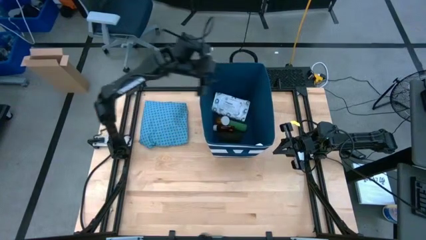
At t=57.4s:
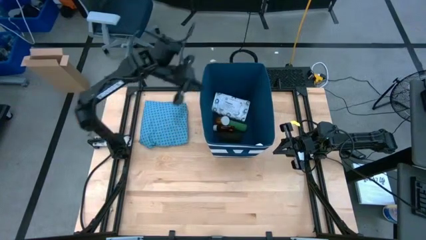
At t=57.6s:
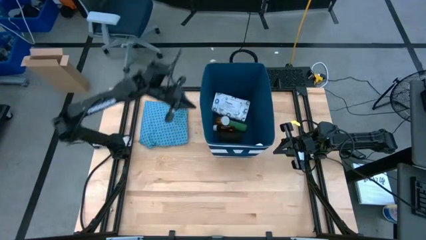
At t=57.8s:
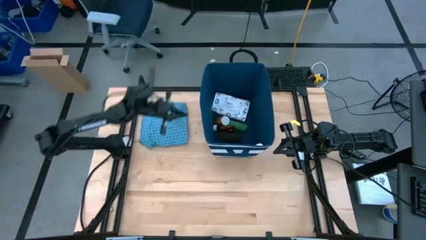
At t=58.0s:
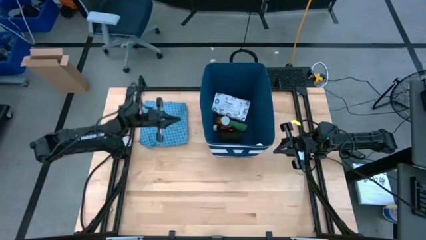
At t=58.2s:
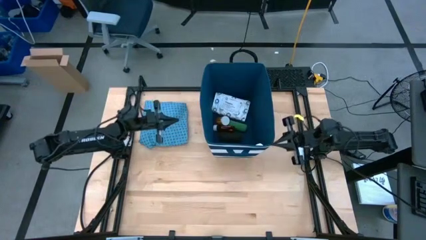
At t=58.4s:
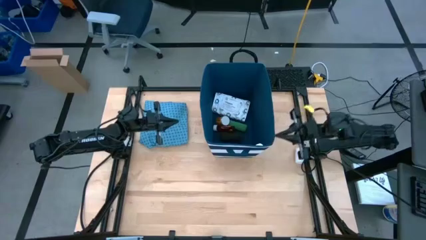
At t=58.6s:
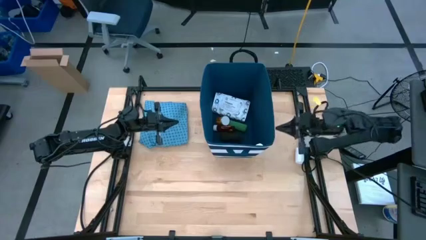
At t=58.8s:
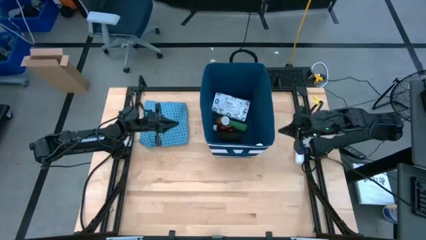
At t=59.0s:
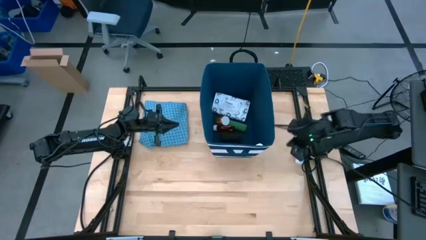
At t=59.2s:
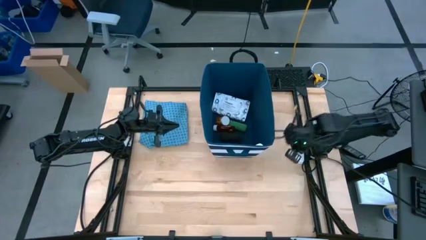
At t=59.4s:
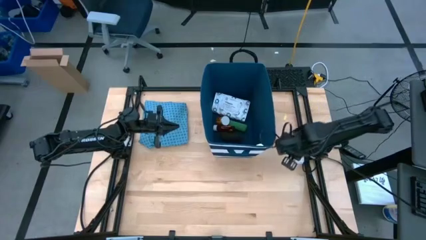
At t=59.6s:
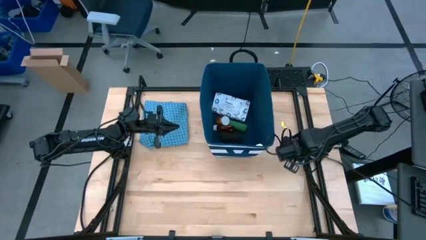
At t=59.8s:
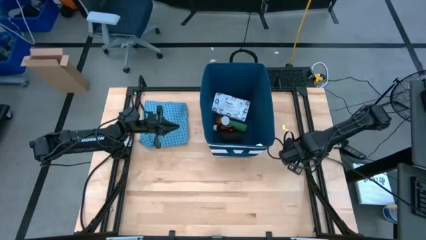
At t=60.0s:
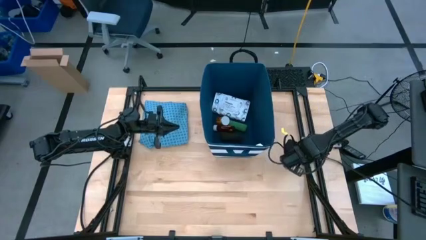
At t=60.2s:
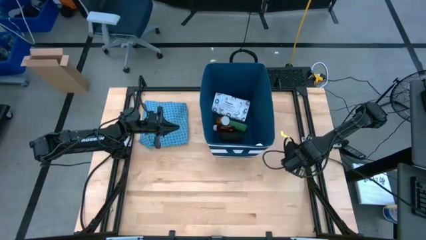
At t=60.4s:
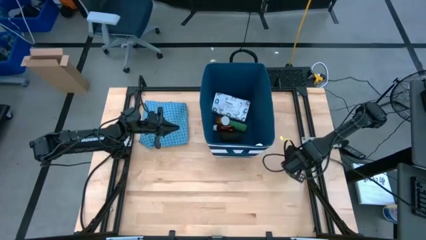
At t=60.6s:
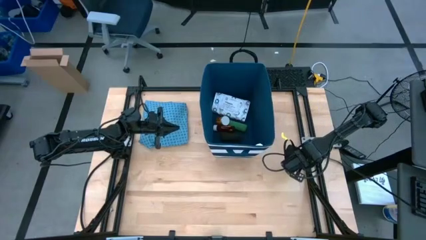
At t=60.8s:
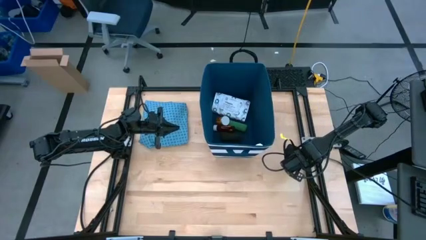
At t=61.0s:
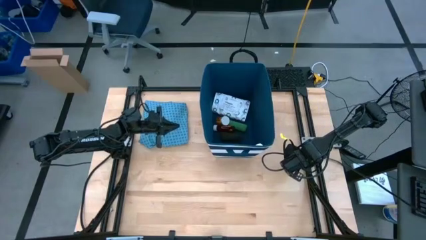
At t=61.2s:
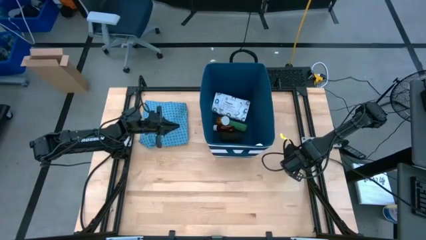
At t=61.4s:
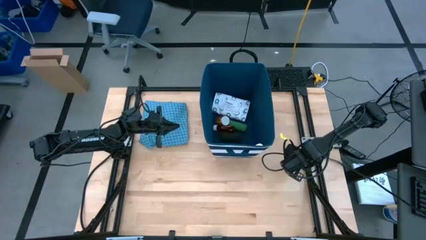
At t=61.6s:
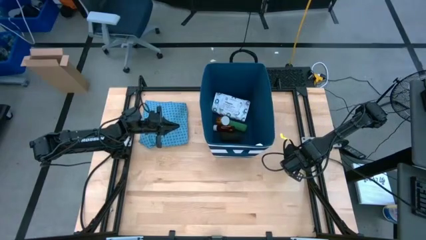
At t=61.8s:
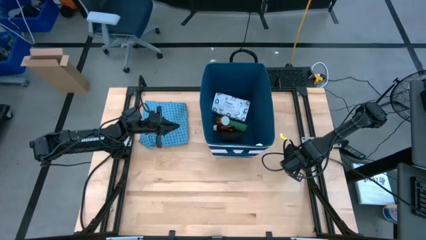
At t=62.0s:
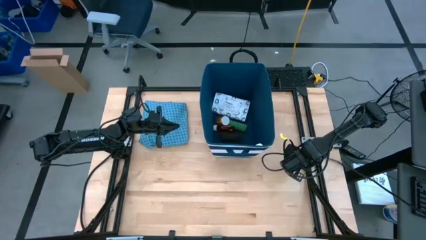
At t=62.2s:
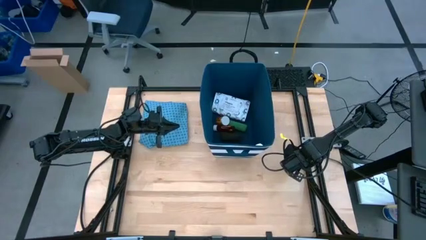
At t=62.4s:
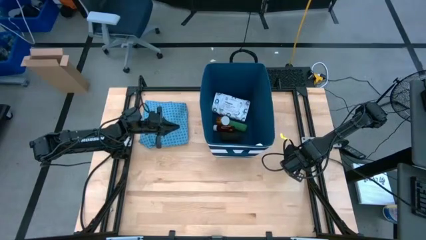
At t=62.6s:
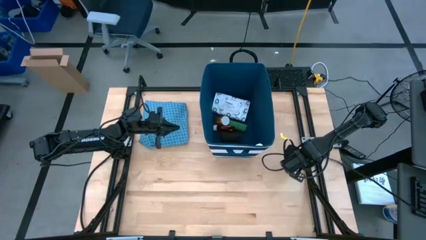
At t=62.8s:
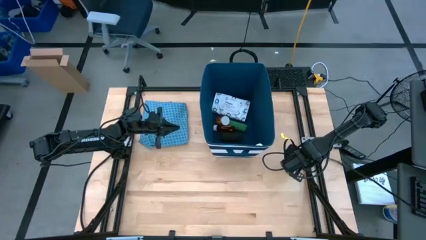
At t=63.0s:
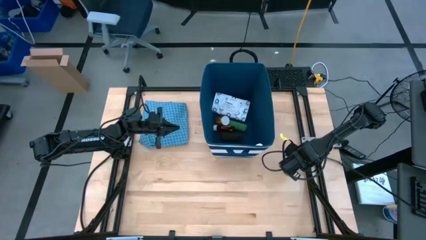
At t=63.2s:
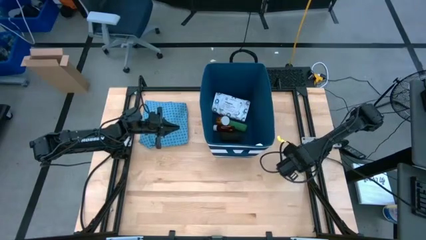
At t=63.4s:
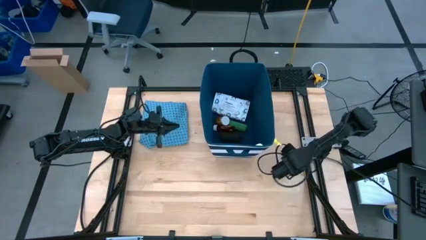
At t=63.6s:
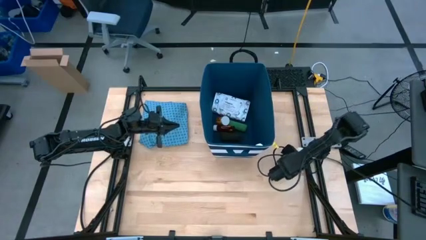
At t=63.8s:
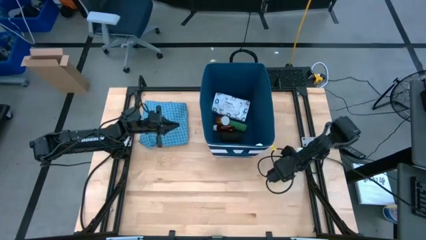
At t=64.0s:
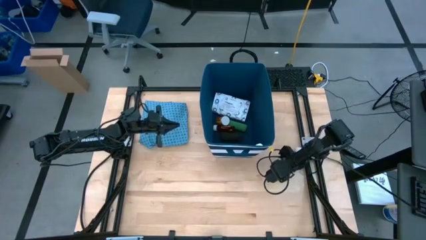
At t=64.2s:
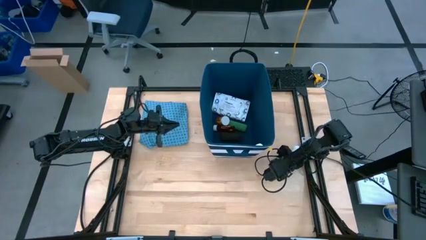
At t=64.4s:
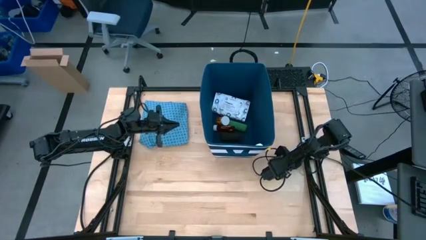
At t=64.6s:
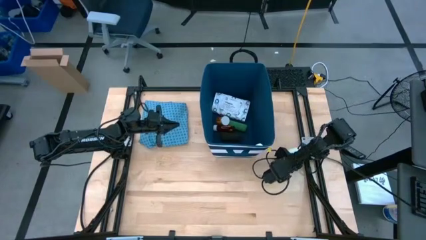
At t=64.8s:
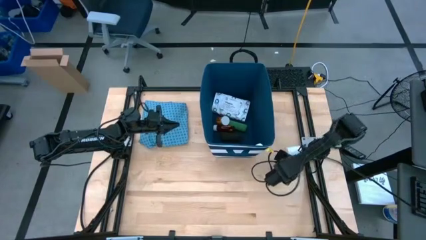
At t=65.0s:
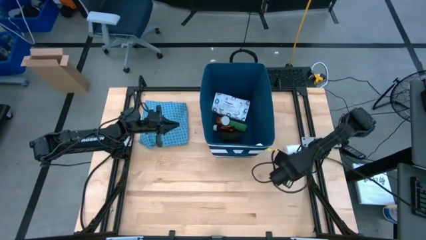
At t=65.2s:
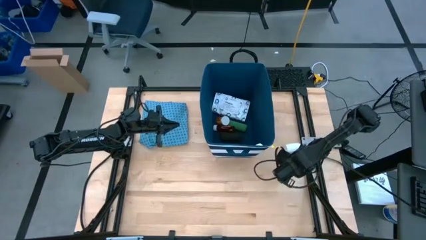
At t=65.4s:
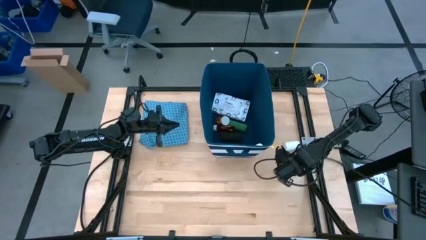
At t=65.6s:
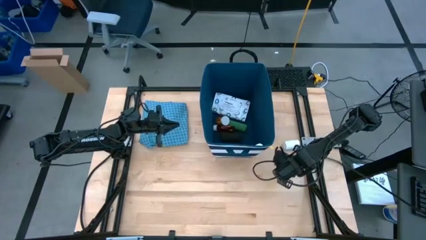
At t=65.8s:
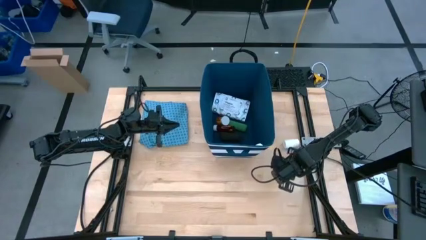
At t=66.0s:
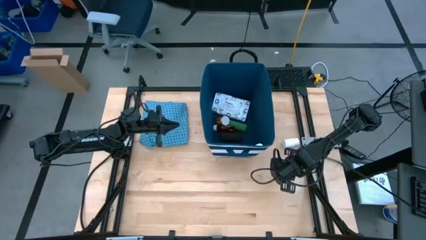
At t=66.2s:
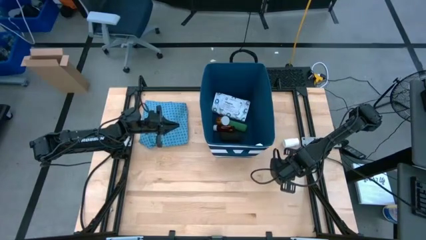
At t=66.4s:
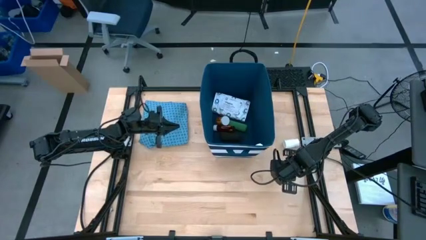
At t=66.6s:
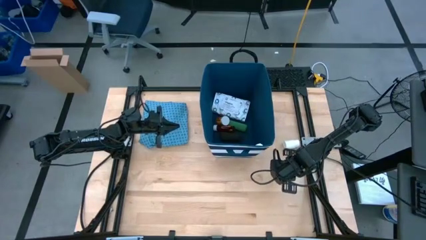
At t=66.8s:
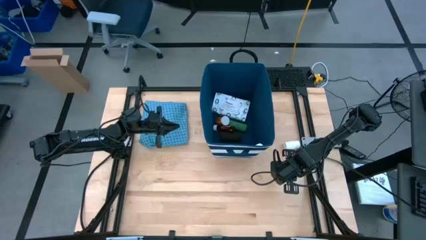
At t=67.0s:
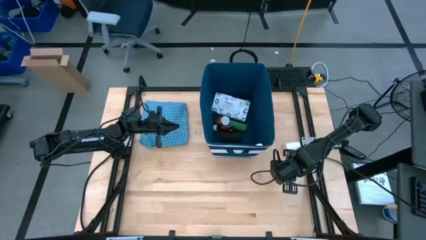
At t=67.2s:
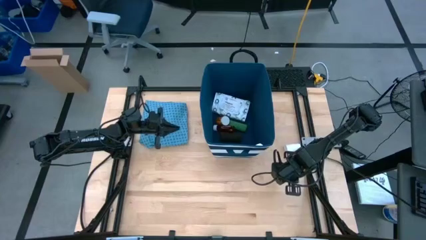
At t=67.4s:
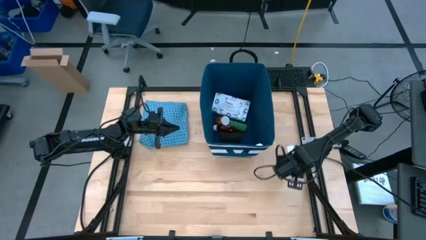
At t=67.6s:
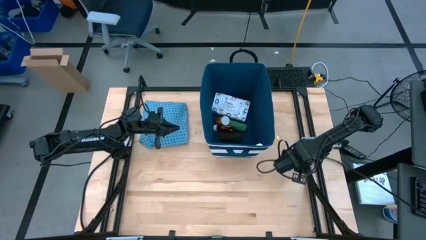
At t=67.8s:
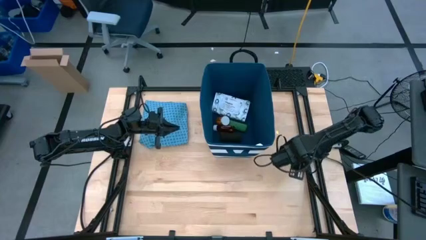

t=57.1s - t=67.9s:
Task: Pick & place medical supplies in basket/bin
Put the white pill bottle into the blue bin
